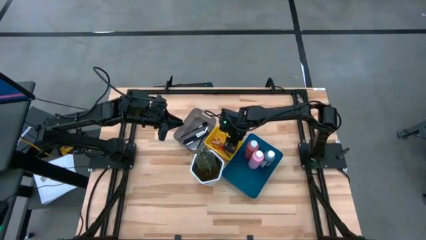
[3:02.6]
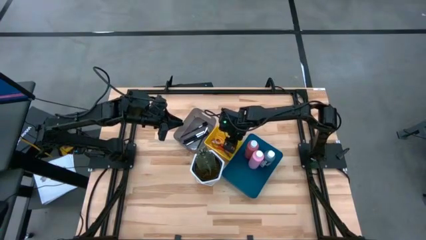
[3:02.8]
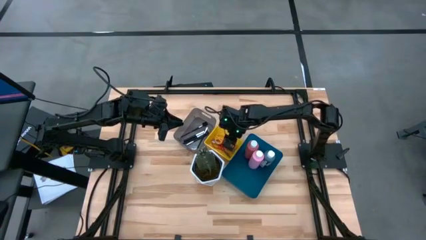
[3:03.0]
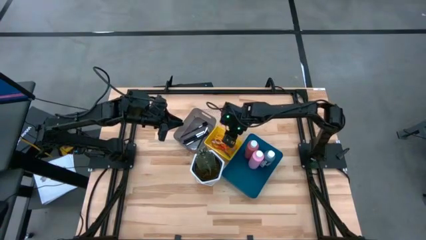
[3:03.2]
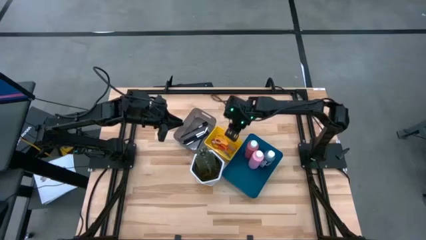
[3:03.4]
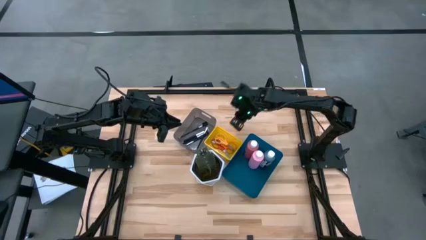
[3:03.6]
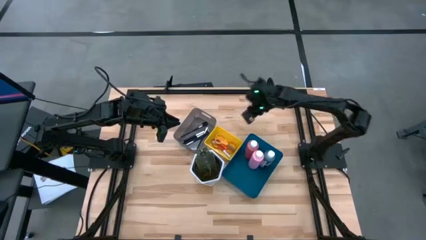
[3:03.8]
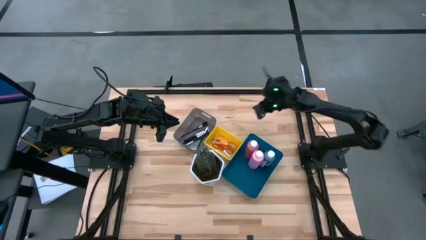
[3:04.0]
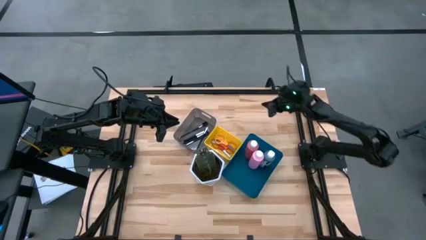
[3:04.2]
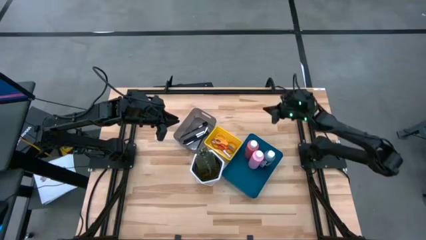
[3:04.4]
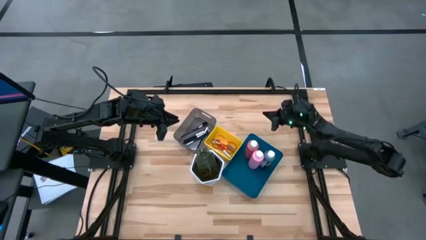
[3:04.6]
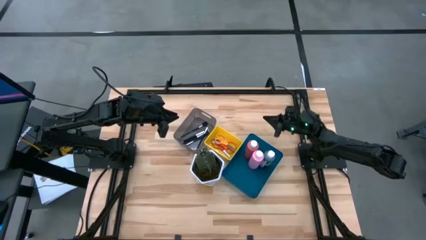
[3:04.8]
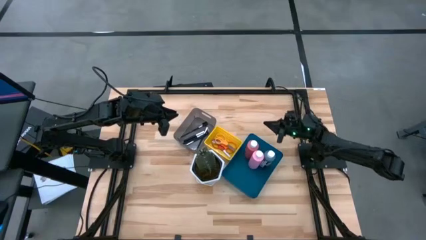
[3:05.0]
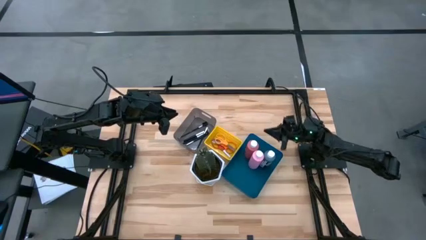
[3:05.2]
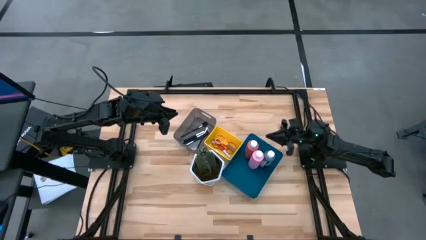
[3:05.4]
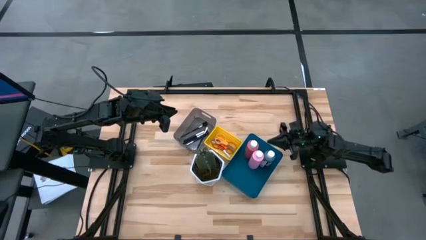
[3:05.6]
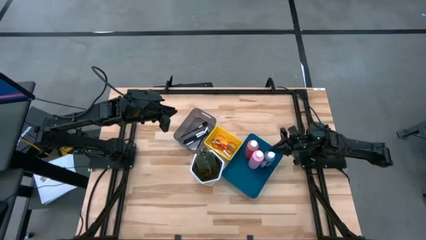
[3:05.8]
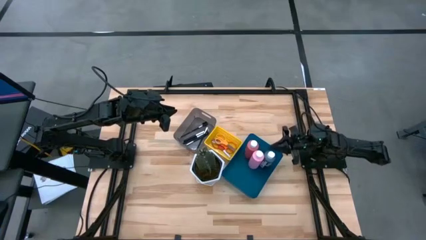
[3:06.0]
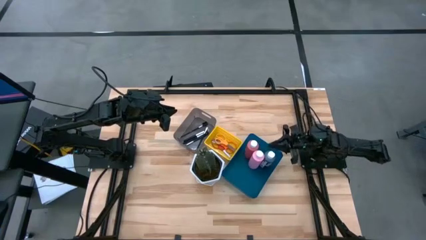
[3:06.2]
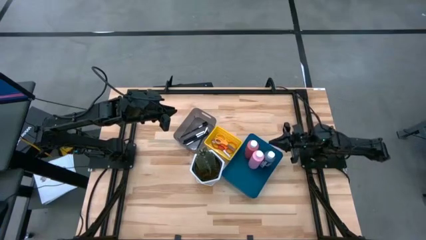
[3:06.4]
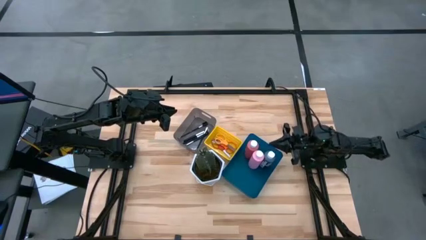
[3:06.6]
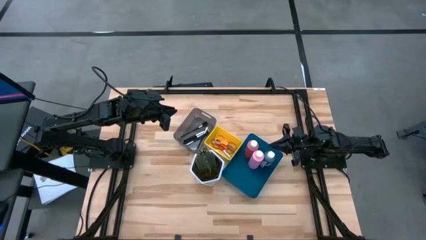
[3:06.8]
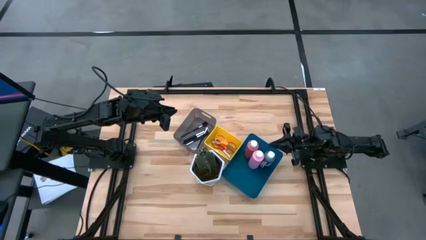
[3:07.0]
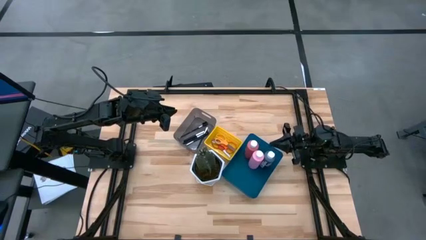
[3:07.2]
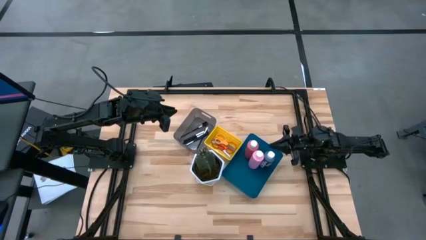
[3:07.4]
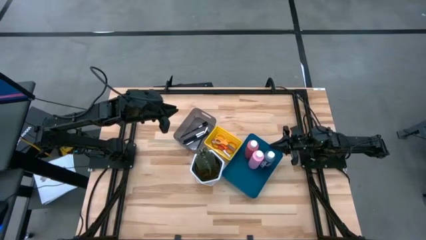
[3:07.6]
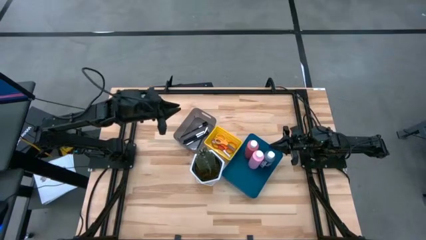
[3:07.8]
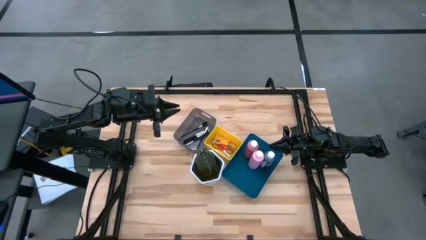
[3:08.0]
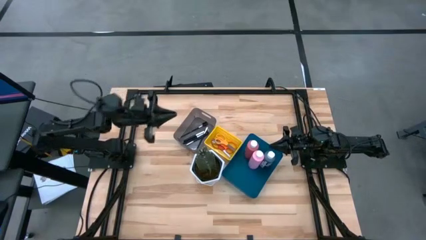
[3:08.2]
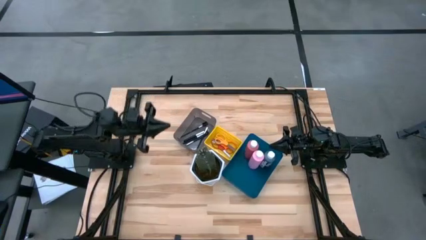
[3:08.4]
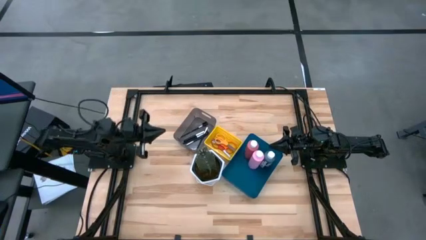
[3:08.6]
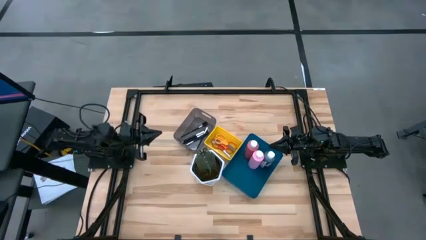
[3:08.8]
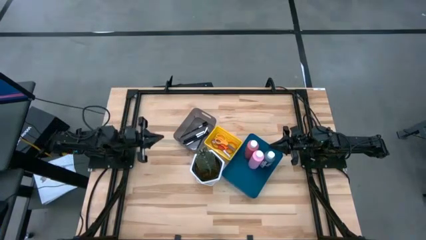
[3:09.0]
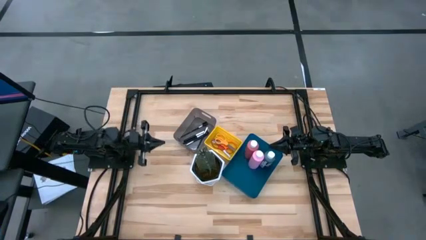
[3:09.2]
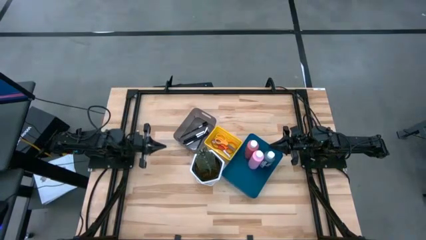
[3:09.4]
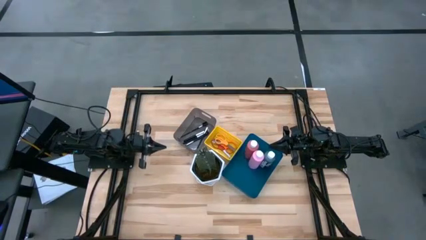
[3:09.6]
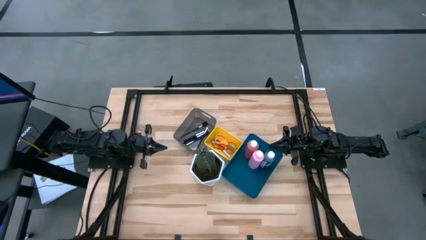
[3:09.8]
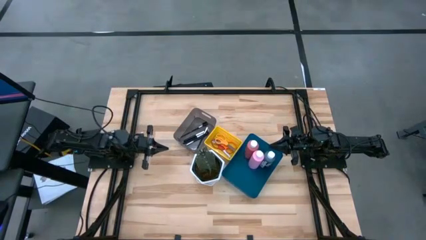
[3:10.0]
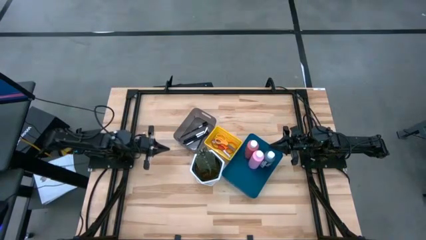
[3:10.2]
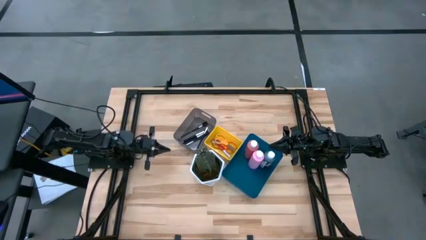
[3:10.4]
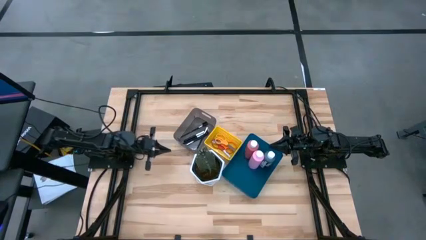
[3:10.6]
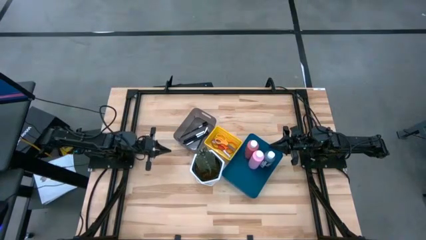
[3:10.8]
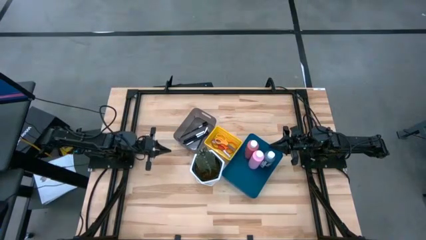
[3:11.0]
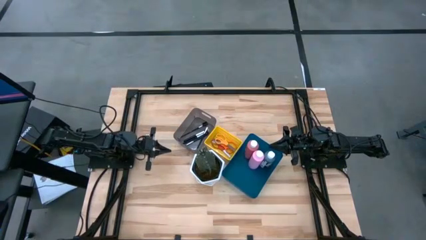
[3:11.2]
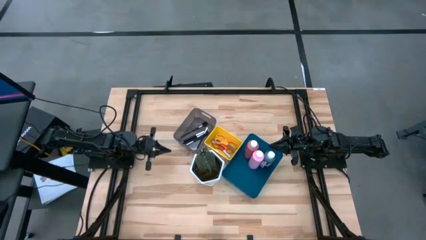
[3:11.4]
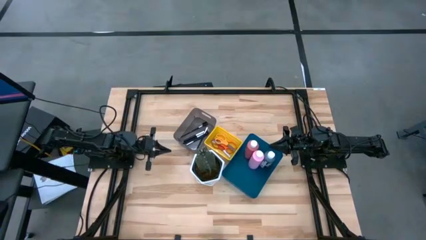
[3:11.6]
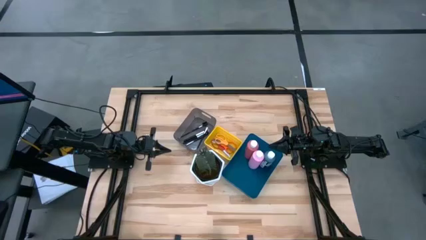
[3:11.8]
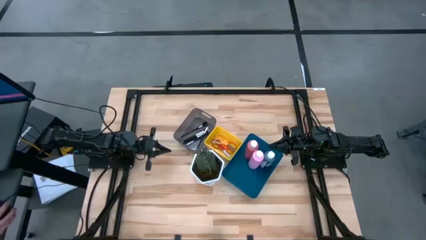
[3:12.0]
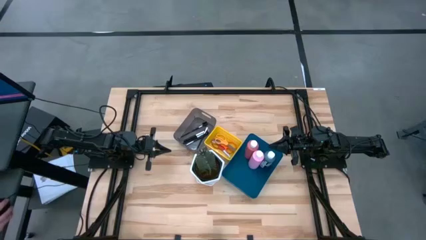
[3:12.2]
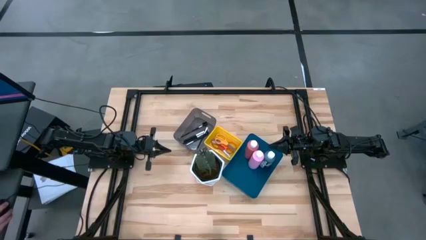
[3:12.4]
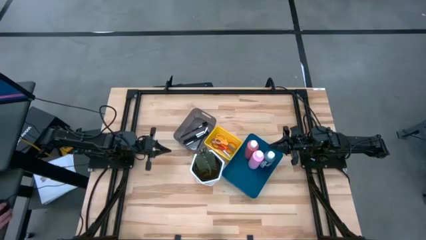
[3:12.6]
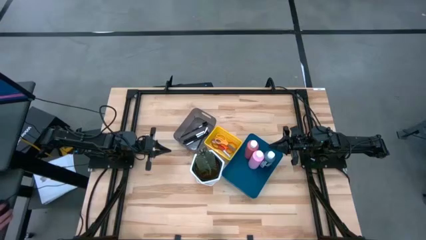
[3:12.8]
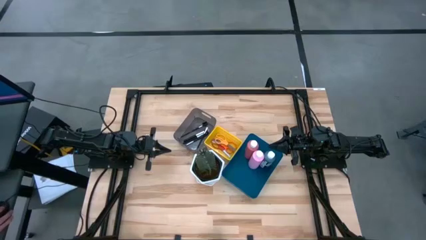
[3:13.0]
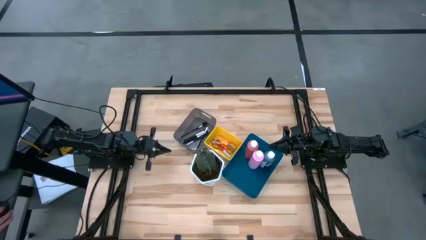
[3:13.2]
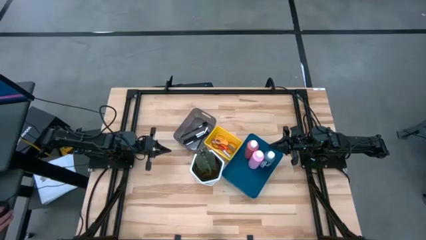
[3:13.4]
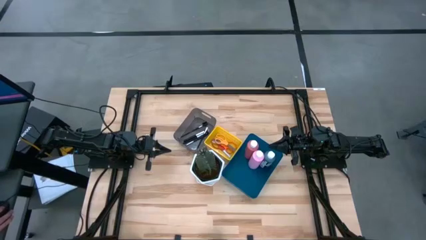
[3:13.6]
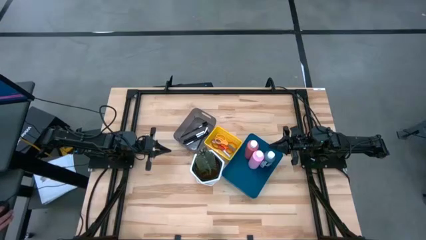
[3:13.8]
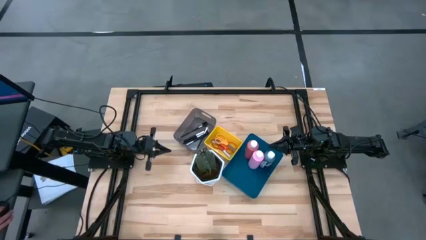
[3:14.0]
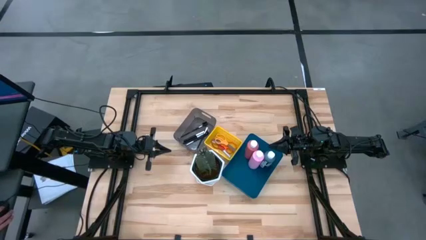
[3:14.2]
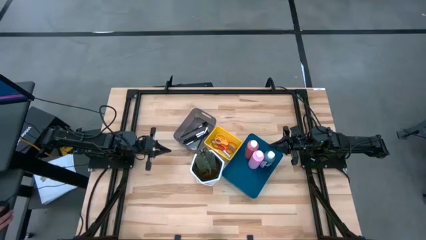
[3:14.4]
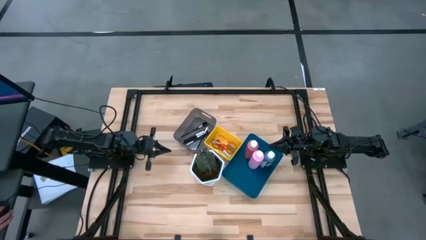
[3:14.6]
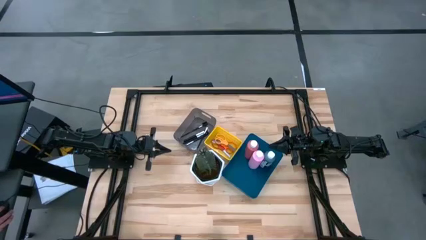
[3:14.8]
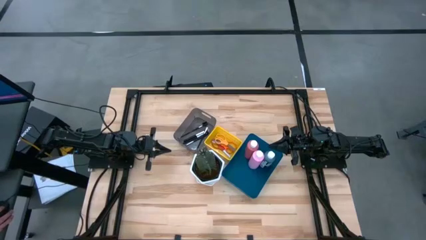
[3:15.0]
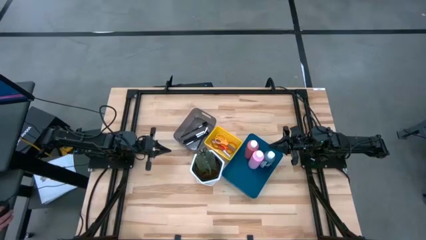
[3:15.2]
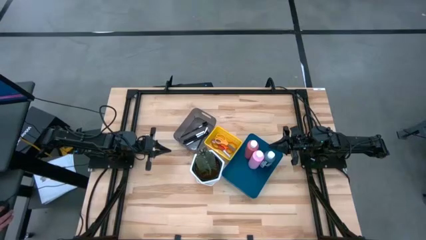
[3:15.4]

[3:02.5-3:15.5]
Task: Pick & Place Paint Supplies
Return to Home Position

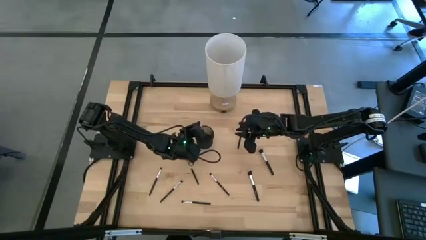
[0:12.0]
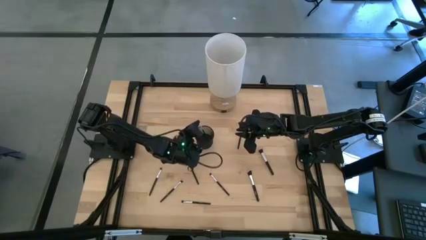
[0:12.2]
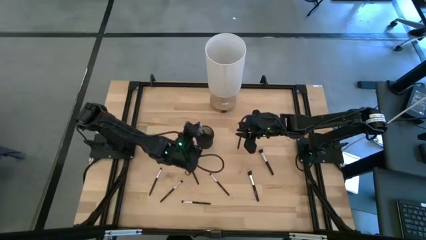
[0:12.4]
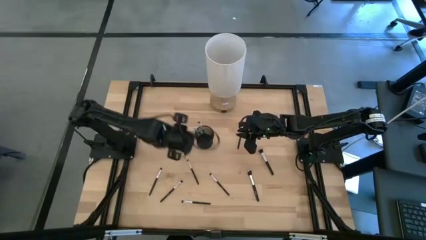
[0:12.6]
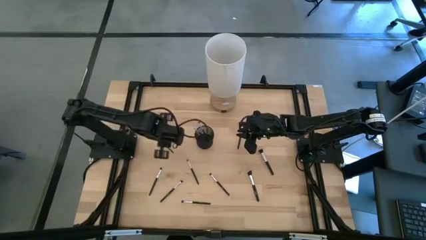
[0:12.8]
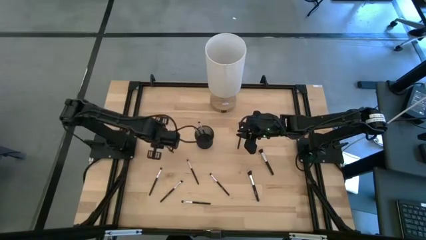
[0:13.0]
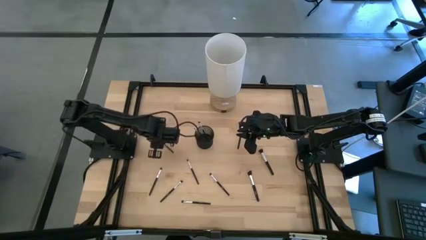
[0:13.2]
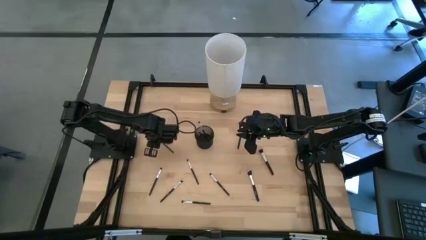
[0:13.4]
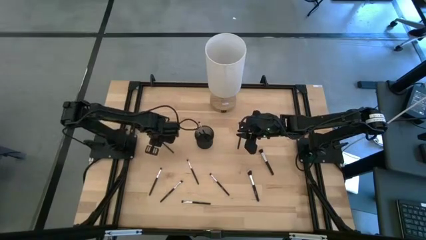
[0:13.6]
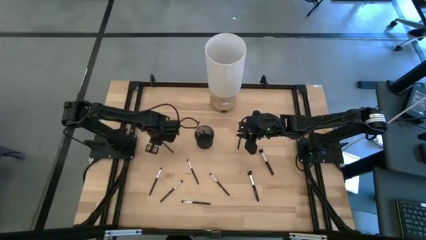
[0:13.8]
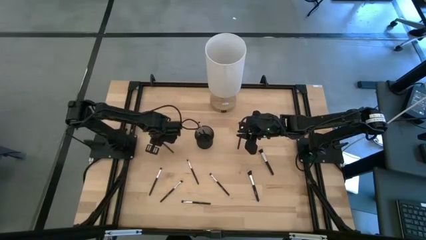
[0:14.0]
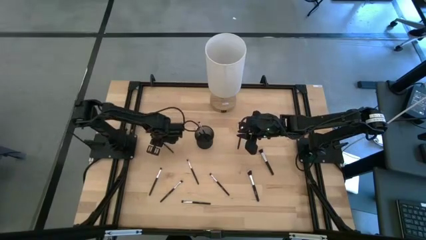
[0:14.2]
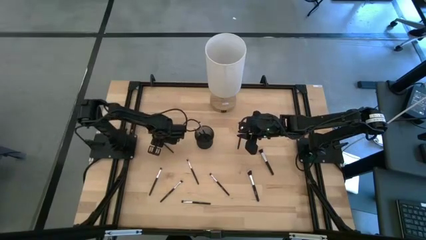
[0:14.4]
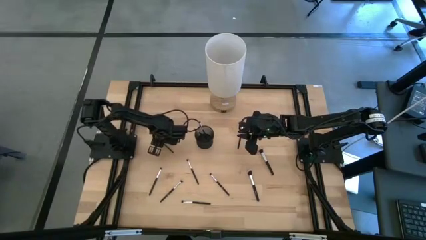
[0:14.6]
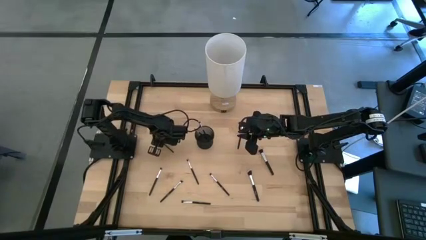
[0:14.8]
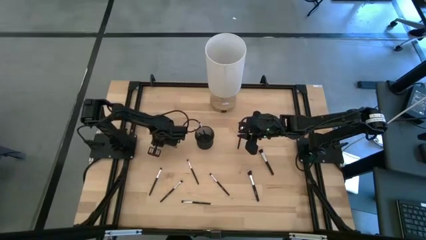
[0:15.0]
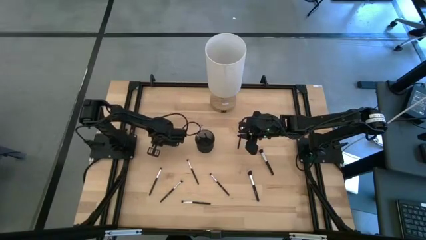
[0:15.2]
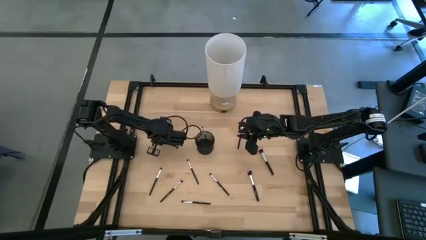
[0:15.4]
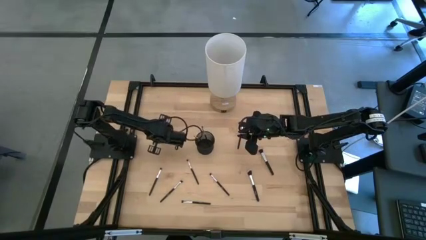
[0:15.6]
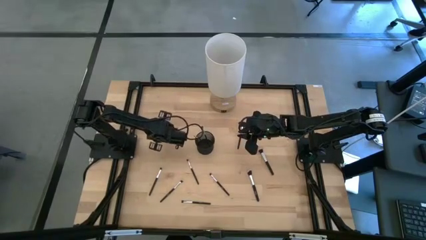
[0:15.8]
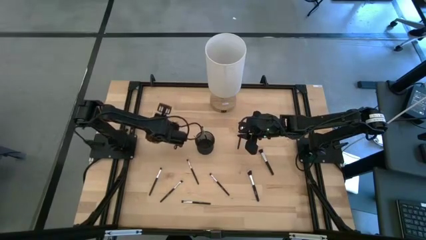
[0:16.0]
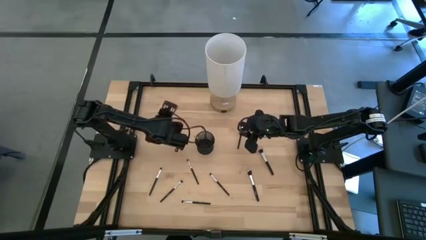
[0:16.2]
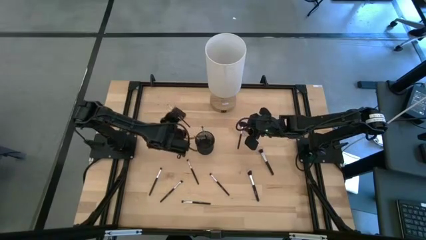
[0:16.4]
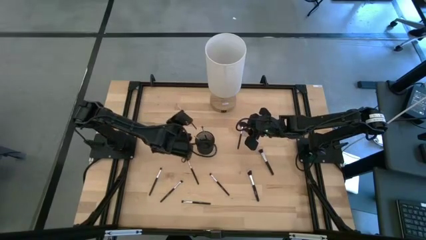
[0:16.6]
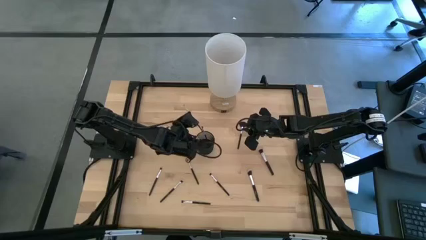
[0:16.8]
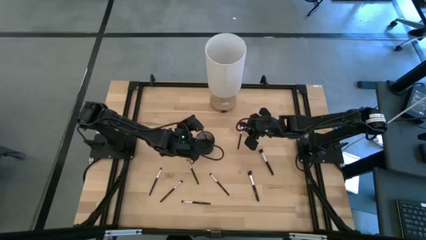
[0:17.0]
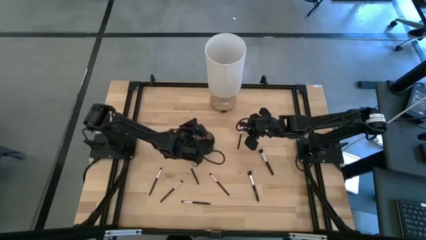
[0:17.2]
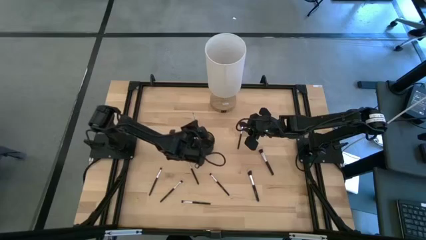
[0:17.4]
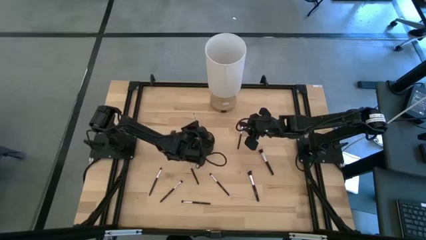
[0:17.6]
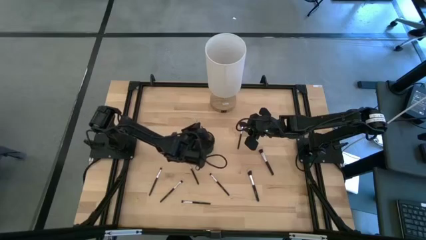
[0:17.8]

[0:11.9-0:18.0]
Task: Put items in baskets/containers
Put the eyeshadow brush into the holder
